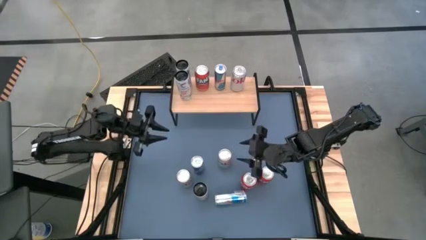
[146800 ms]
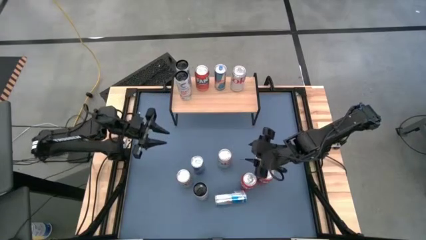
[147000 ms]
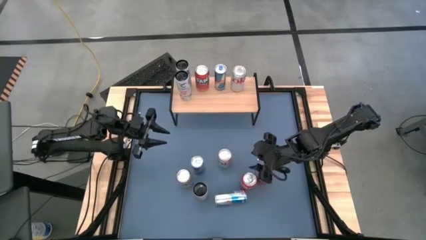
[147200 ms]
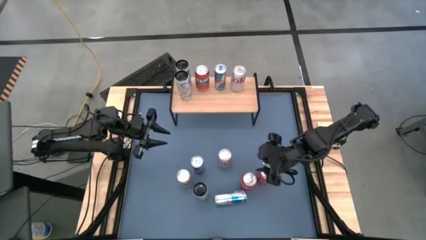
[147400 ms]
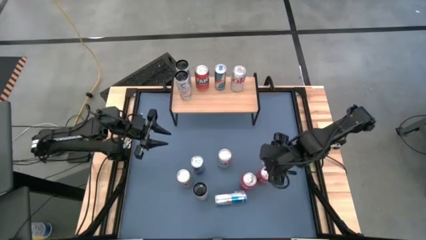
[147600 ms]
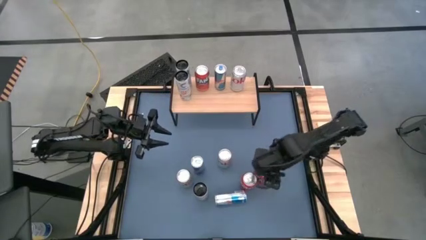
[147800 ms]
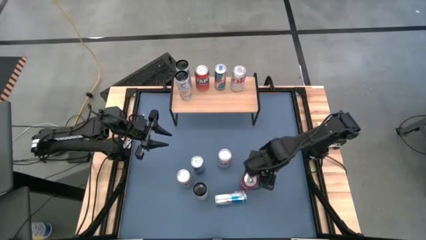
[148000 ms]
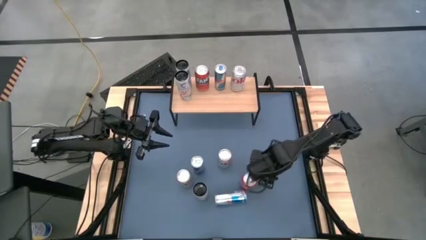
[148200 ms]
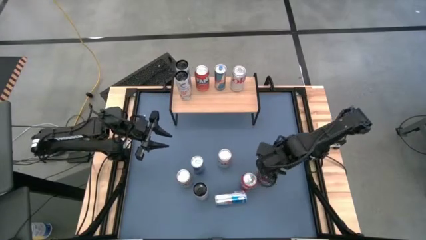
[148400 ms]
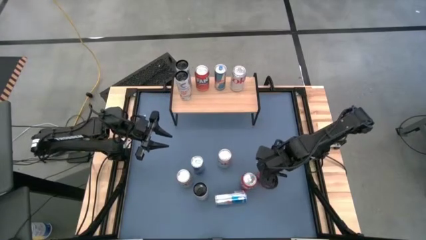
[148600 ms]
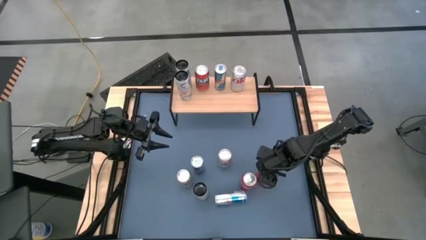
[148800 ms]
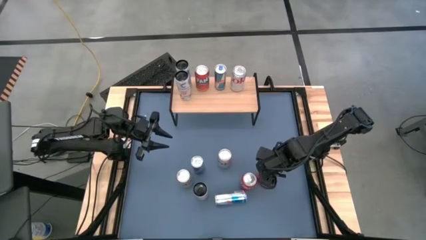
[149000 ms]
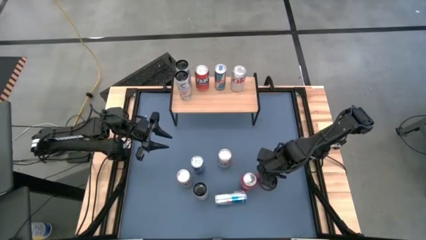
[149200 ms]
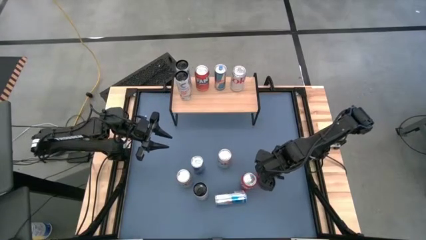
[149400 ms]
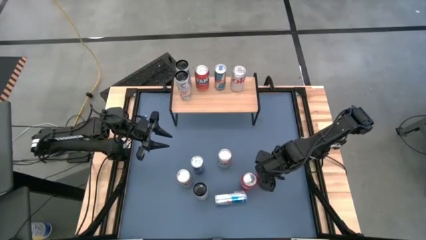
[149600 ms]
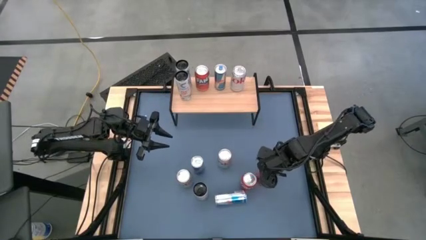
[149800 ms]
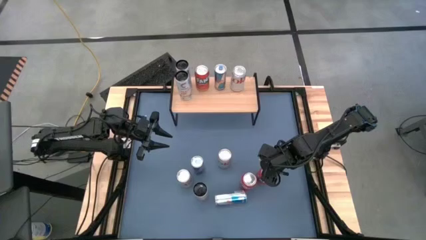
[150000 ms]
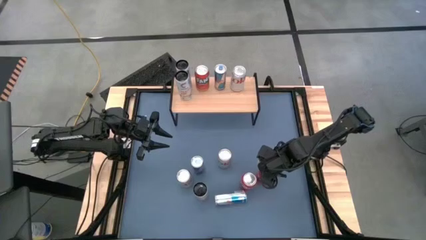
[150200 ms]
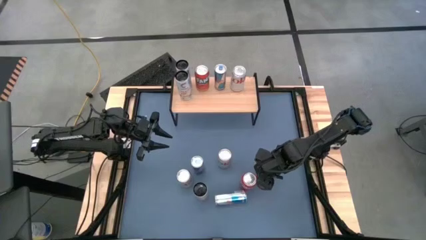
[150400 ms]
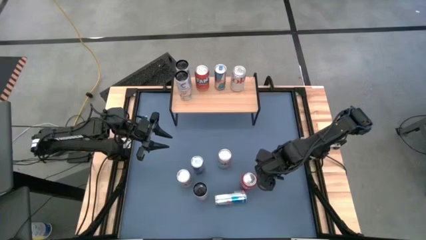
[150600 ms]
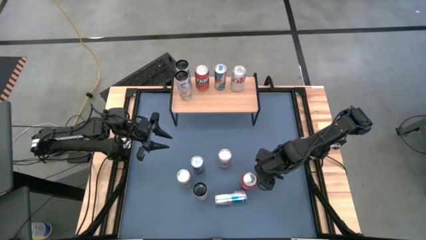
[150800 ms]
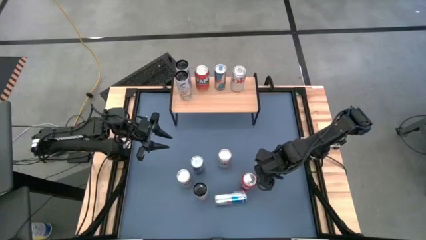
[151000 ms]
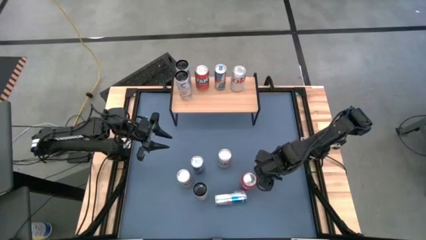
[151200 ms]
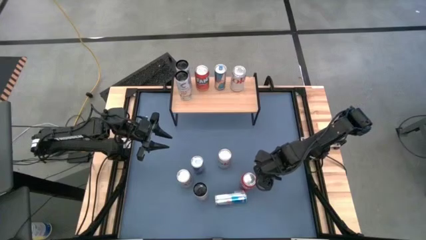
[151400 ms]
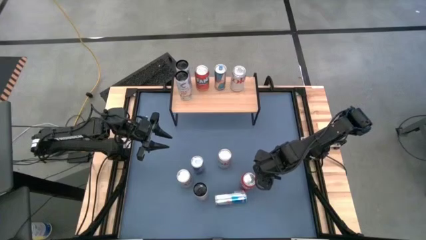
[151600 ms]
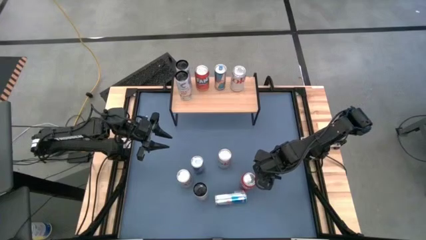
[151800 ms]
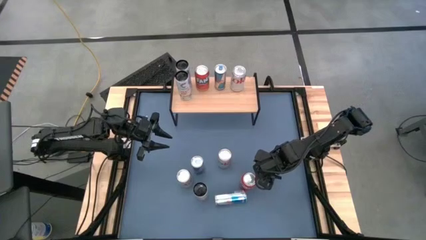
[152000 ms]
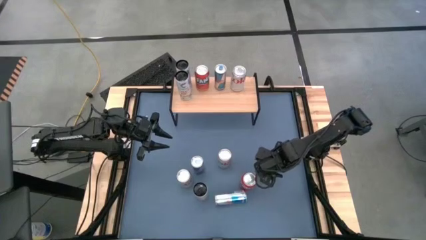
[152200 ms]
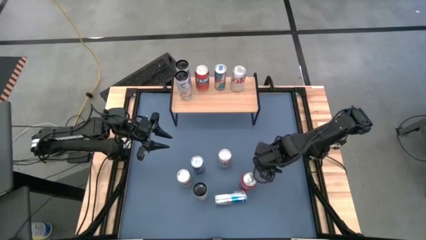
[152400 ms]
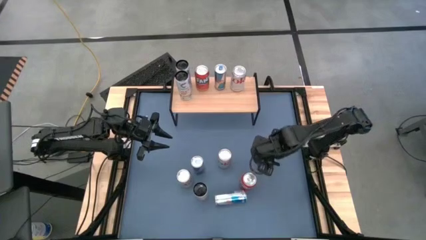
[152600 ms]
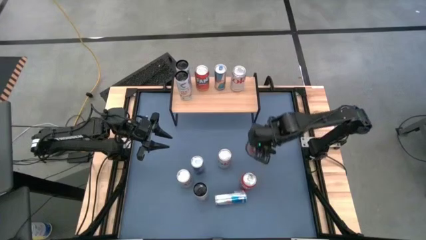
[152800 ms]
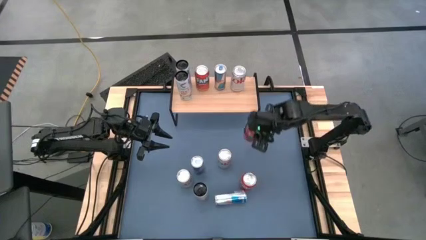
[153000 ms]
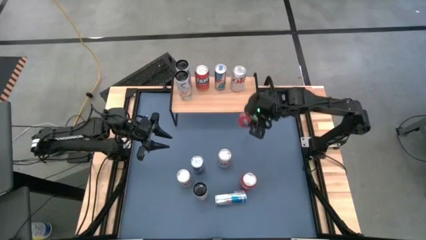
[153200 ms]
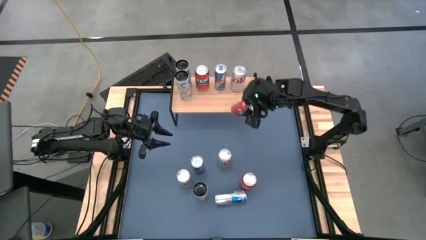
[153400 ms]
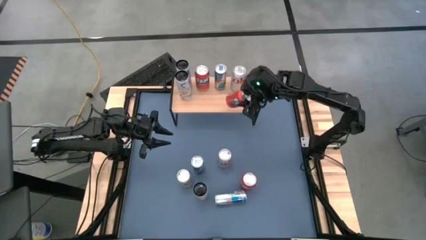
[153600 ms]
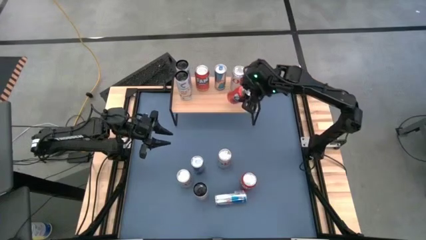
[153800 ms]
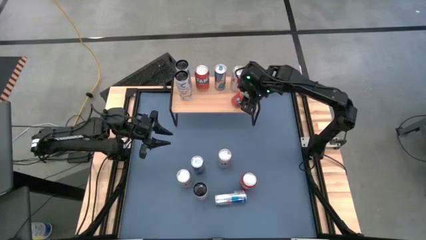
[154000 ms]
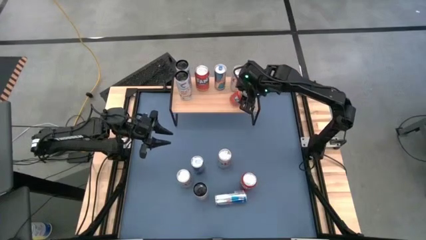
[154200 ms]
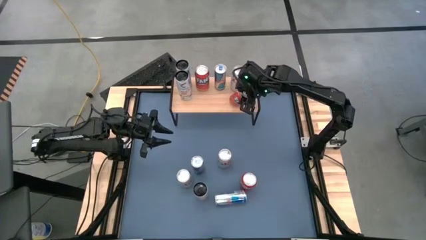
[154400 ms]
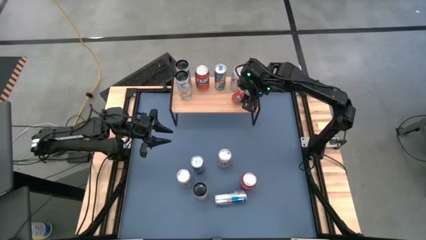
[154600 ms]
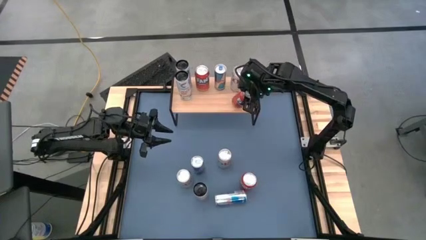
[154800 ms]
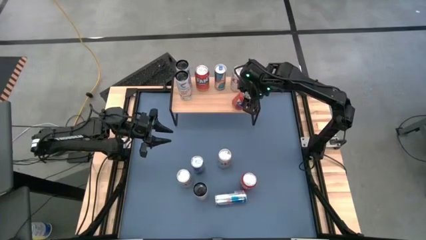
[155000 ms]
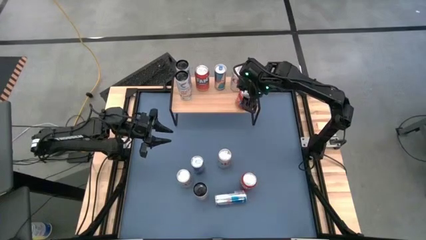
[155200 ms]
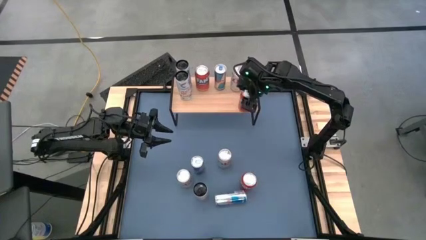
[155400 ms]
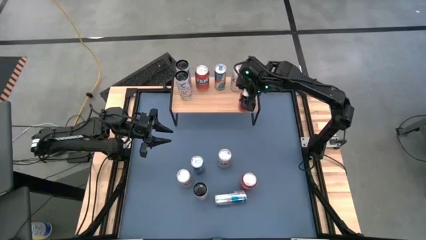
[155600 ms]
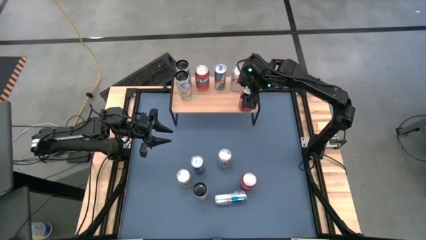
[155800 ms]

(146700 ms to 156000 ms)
Task: Place canned beverage on shelf
Put the right orange soda can on the shelf

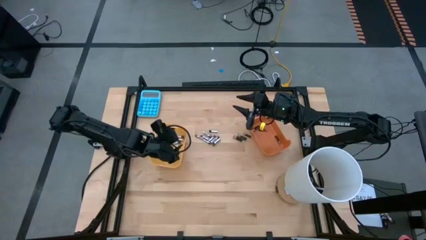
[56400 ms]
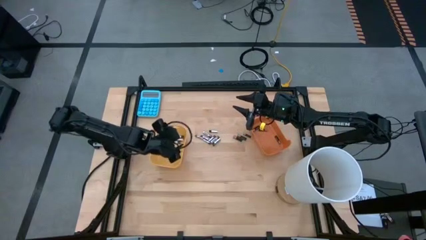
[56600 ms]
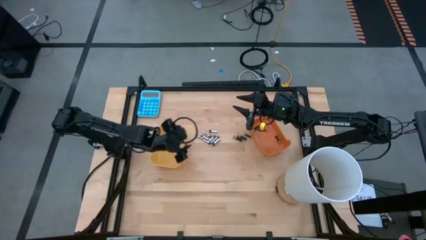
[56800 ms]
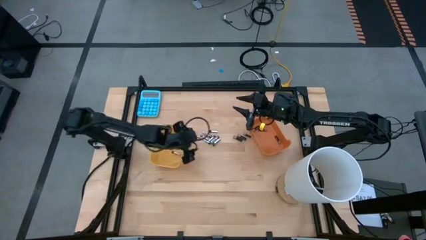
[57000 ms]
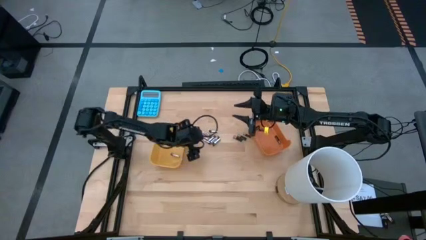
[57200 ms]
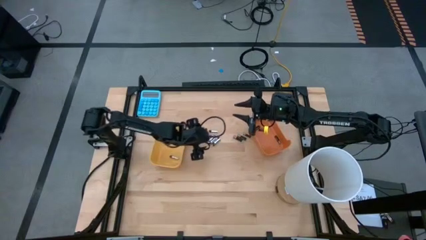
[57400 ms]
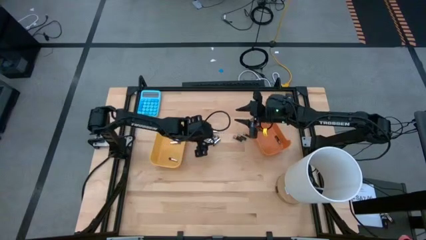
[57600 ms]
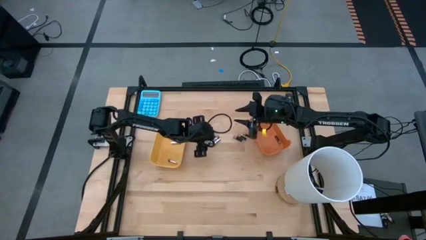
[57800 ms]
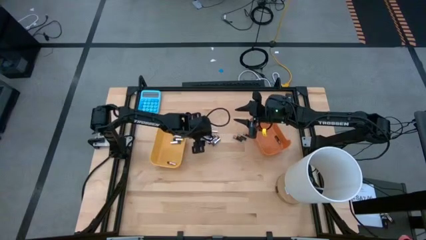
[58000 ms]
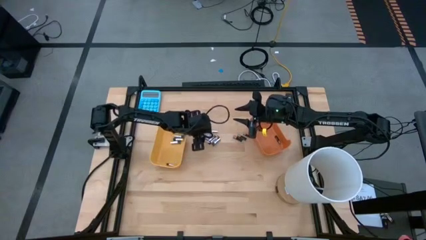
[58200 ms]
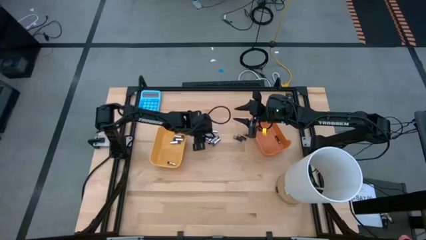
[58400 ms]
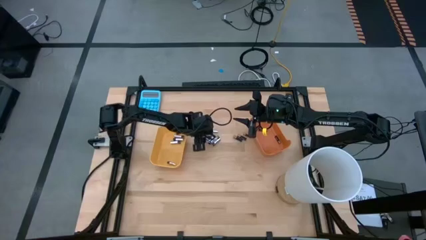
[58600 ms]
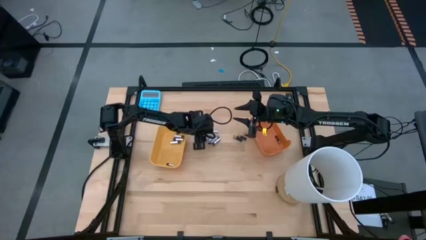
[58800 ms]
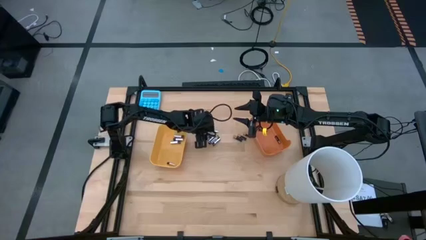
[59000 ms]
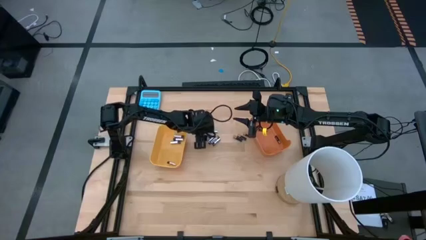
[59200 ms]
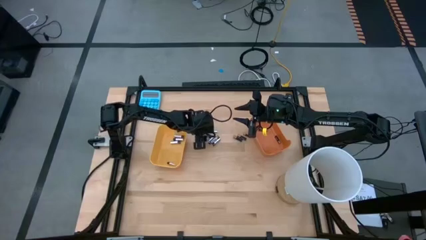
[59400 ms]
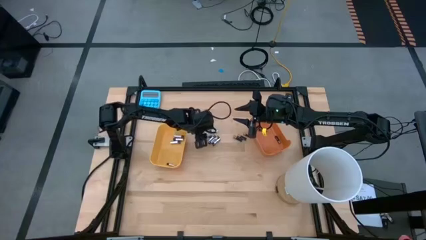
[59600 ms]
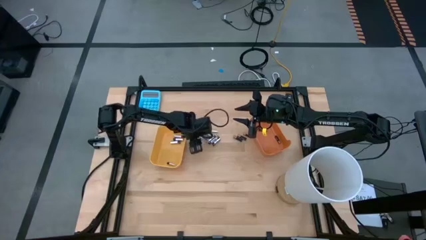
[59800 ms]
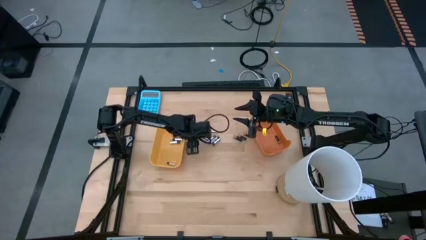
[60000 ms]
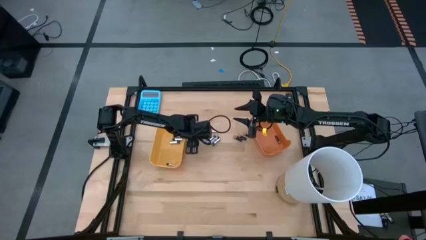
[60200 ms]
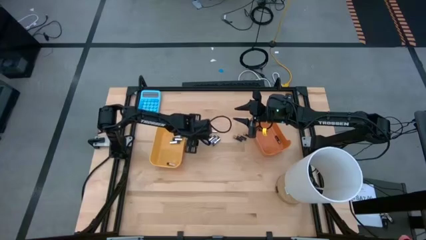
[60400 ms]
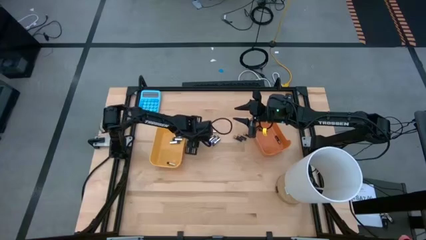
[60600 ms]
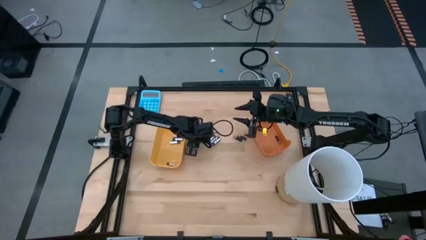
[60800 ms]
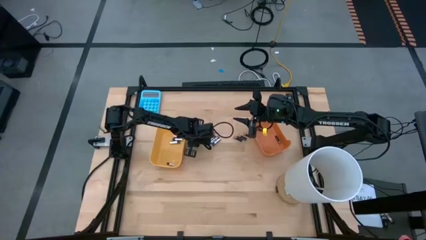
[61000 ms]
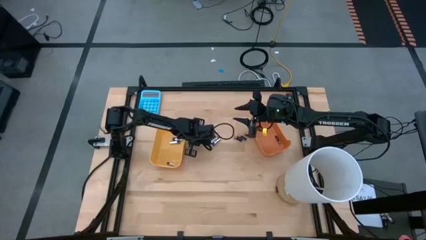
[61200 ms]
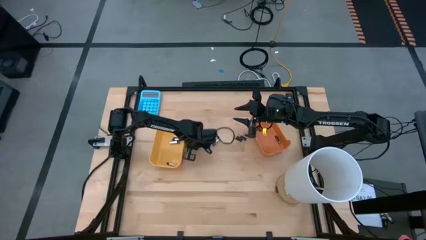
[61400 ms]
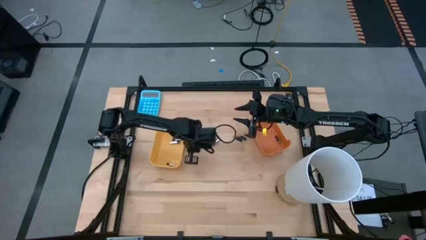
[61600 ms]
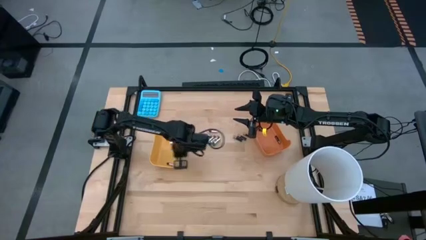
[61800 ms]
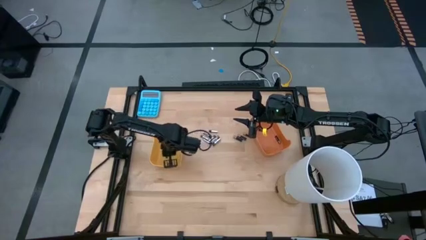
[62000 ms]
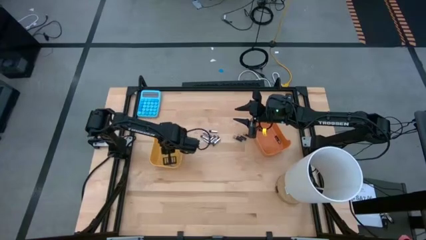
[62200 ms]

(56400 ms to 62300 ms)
Task: Sort batteries
Put the silver battery into the yellow bin

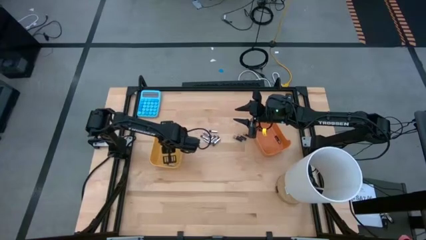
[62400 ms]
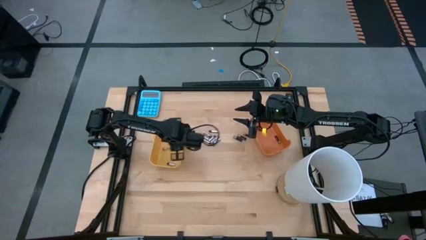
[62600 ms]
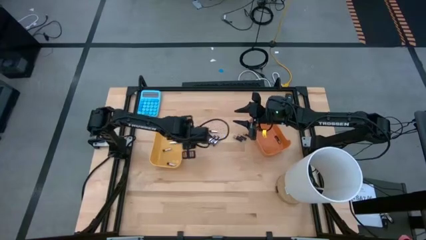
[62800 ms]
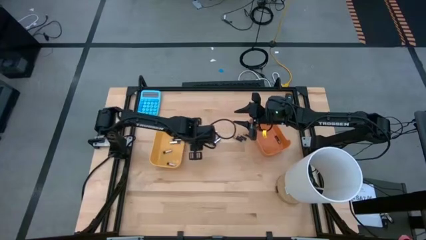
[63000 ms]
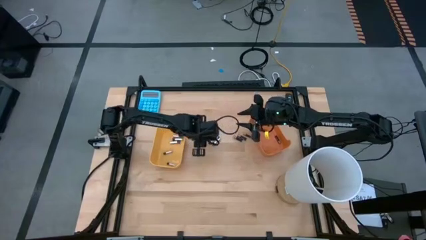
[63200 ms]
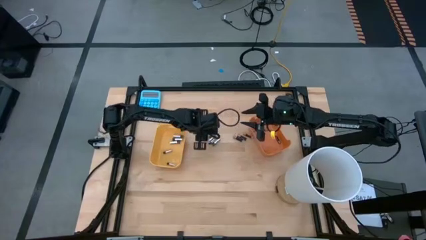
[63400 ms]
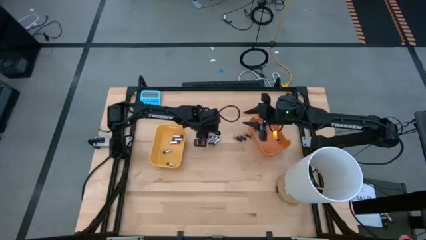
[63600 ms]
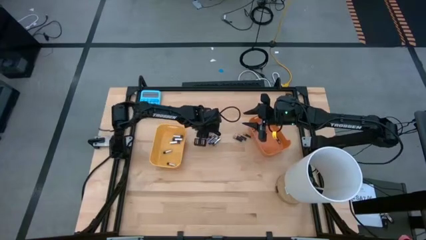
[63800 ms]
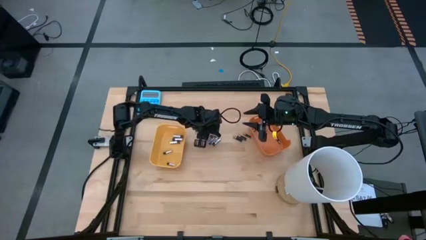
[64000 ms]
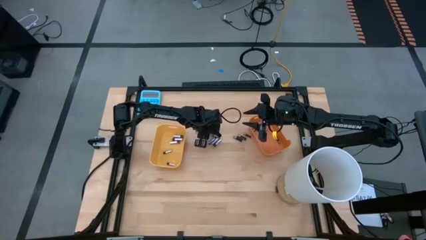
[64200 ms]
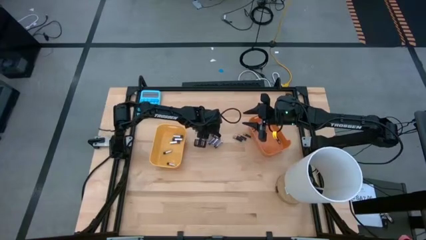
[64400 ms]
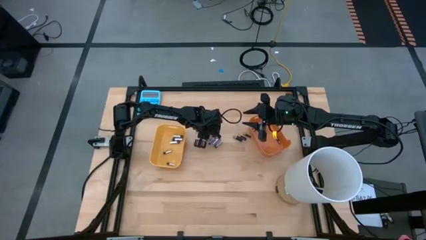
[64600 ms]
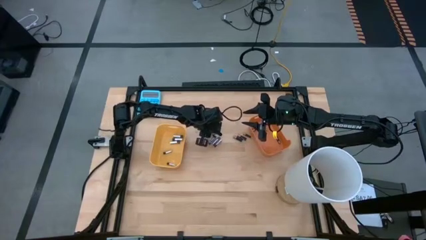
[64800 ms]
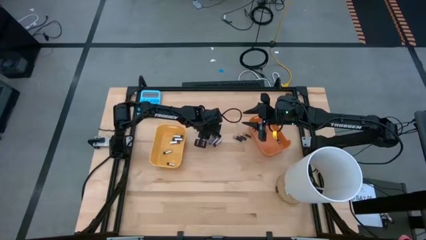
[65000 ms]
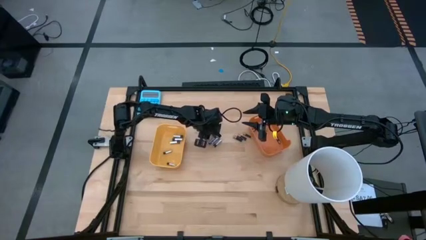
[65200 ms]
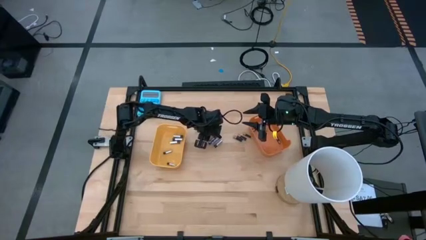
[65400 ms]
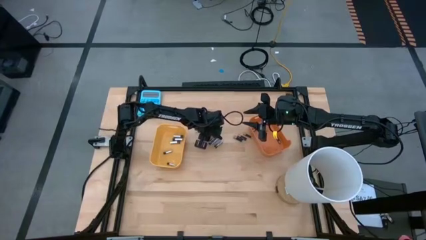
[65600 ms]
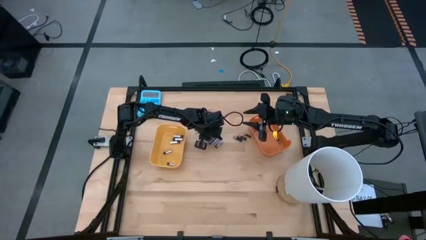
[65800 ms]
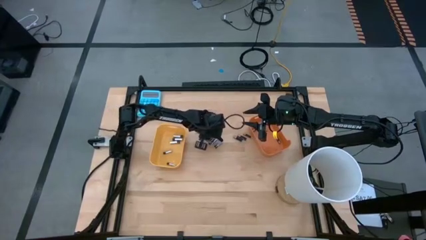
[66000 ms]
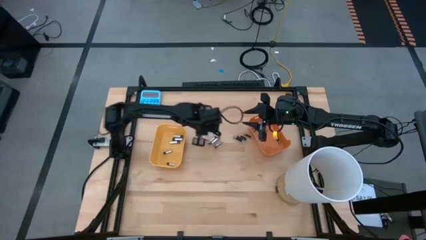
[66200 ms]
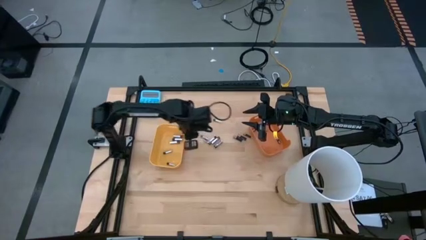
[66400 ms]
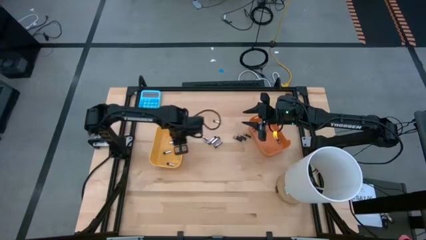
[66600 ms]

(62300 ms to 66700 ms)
Put the silver battery into the yellow bin
